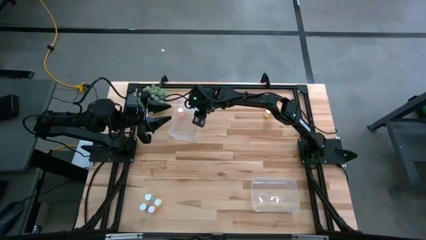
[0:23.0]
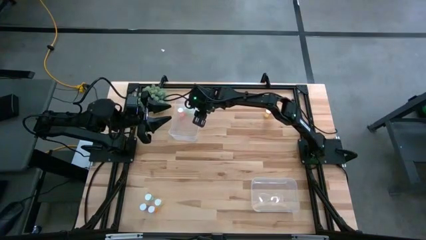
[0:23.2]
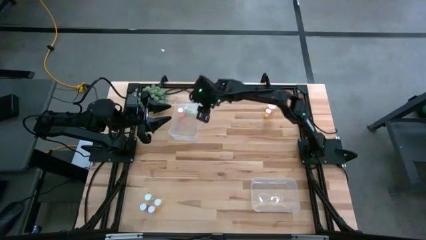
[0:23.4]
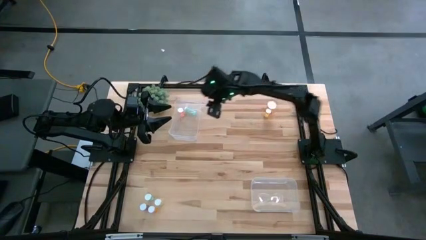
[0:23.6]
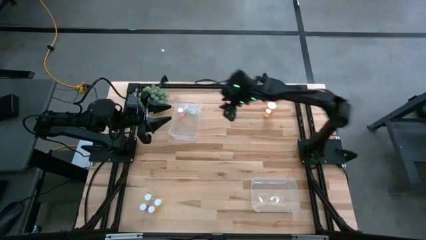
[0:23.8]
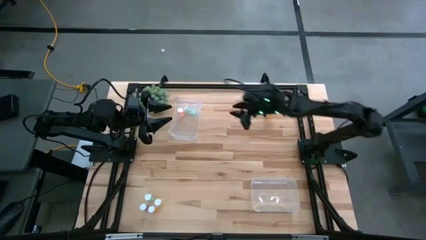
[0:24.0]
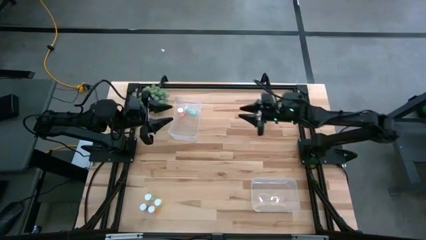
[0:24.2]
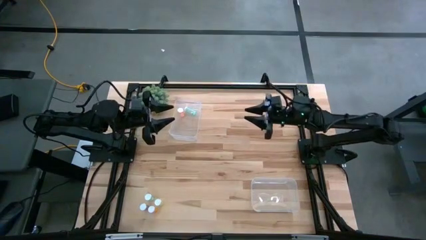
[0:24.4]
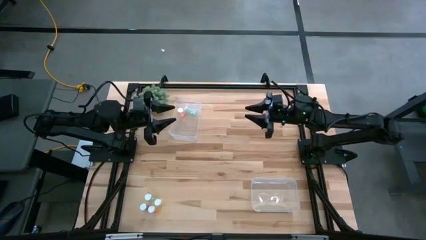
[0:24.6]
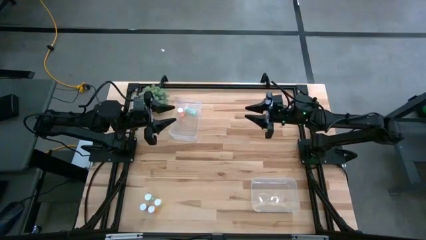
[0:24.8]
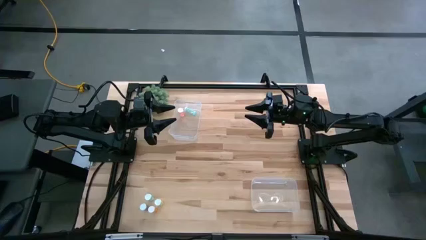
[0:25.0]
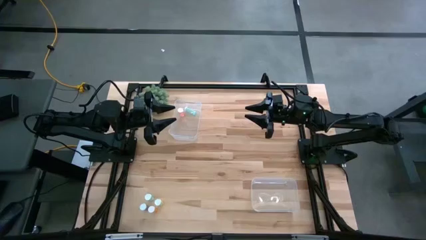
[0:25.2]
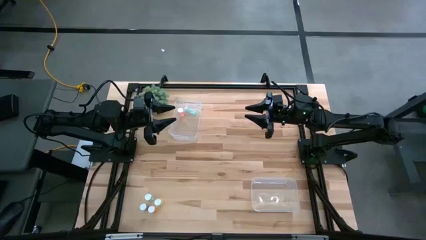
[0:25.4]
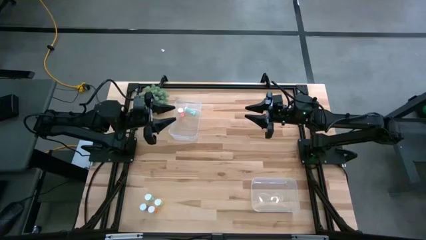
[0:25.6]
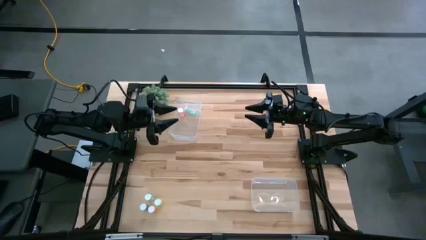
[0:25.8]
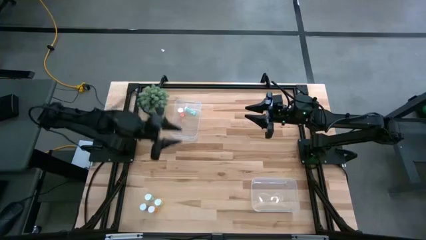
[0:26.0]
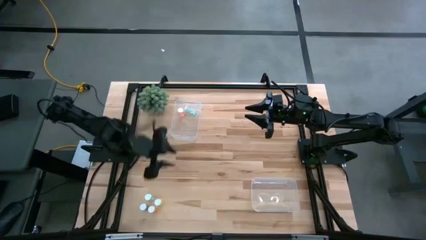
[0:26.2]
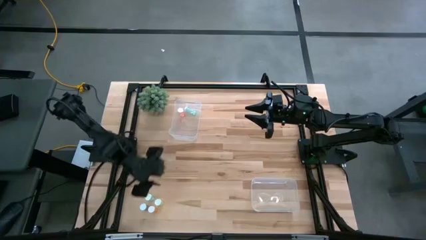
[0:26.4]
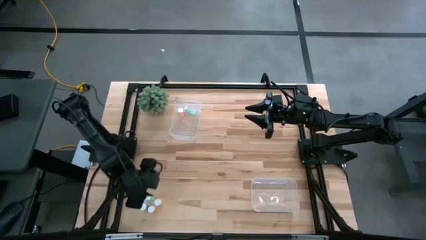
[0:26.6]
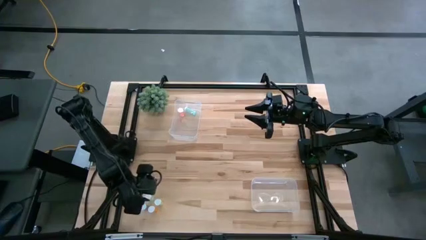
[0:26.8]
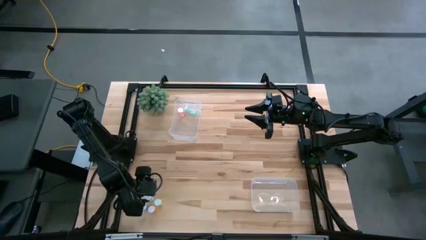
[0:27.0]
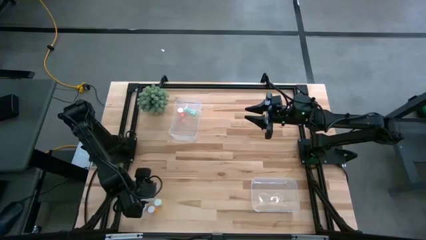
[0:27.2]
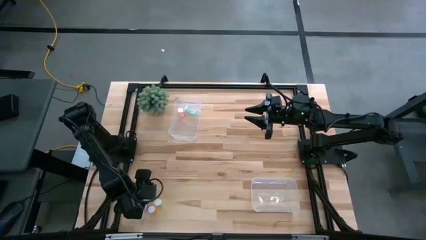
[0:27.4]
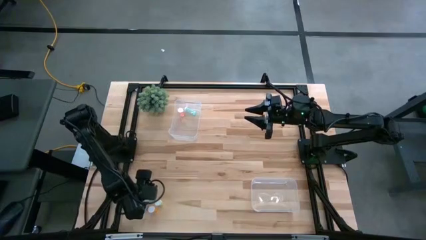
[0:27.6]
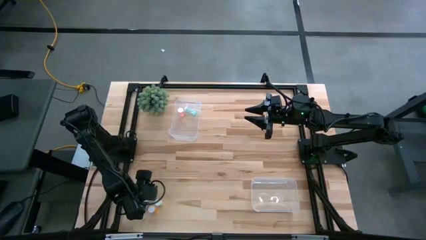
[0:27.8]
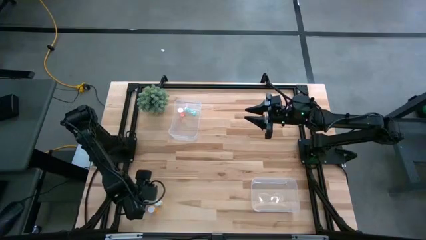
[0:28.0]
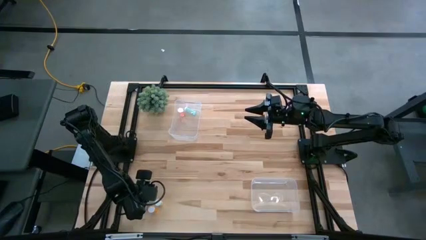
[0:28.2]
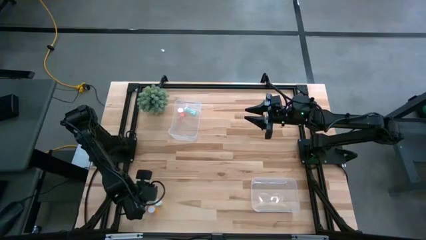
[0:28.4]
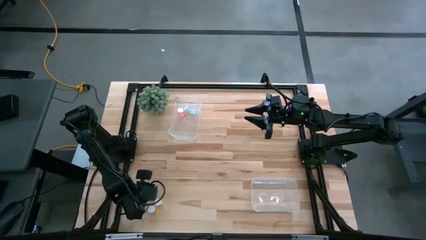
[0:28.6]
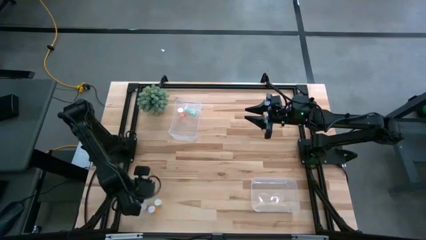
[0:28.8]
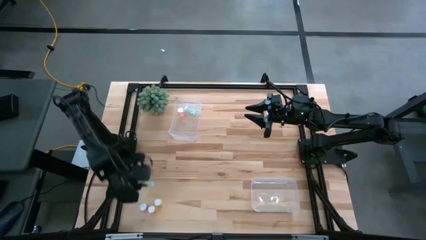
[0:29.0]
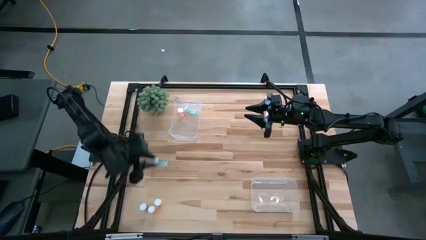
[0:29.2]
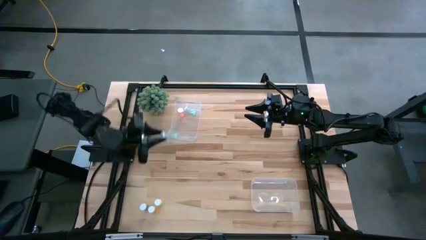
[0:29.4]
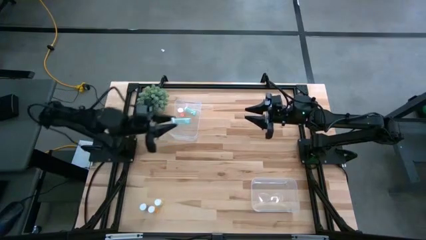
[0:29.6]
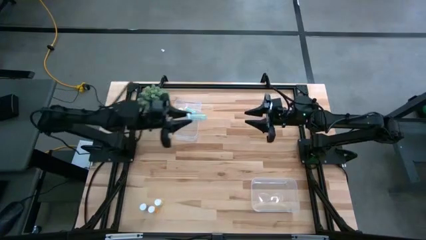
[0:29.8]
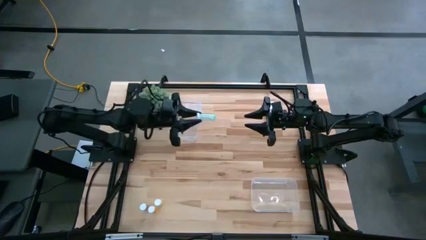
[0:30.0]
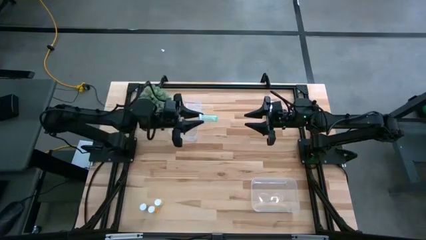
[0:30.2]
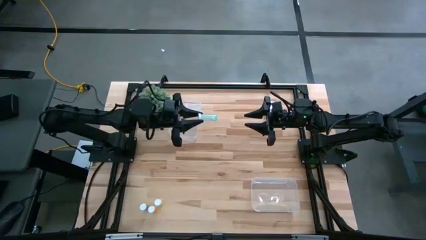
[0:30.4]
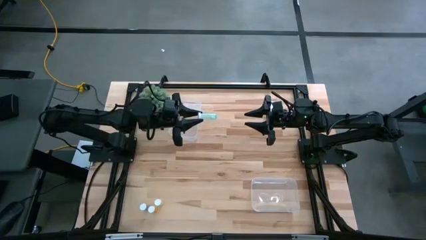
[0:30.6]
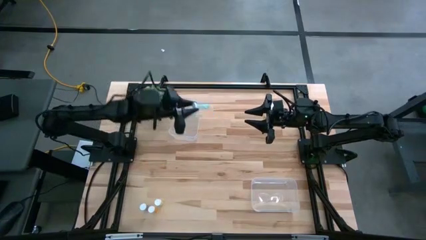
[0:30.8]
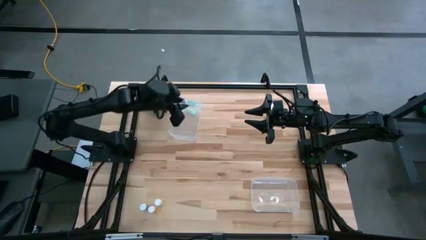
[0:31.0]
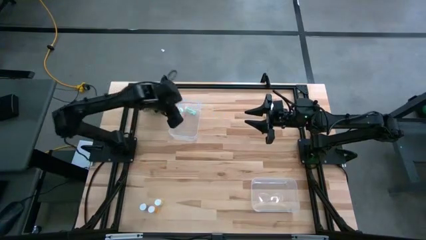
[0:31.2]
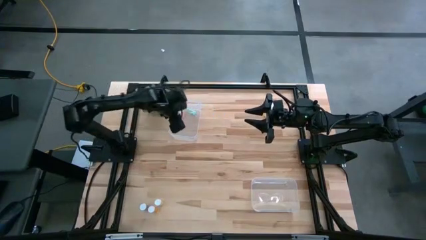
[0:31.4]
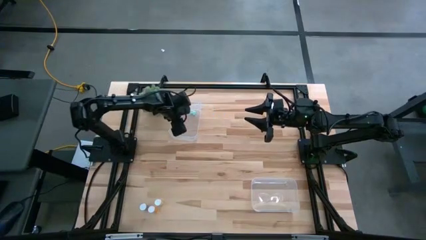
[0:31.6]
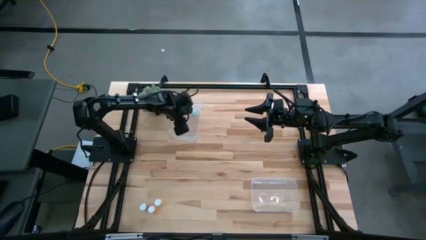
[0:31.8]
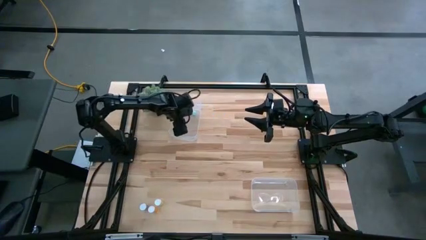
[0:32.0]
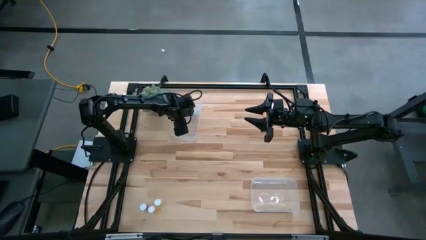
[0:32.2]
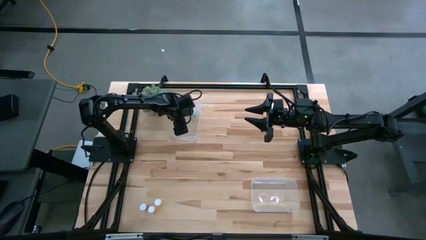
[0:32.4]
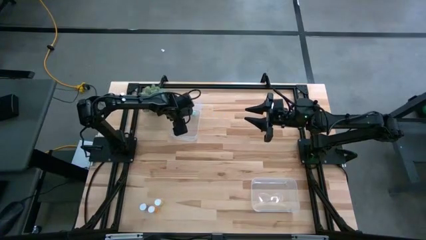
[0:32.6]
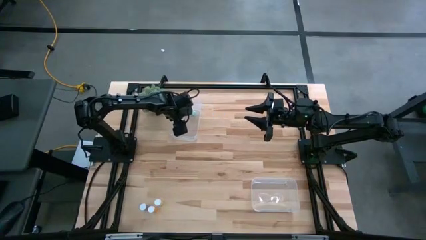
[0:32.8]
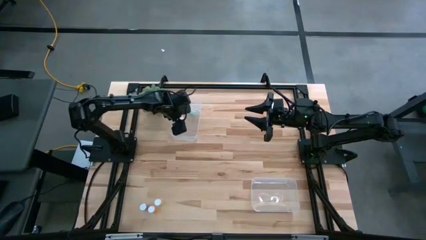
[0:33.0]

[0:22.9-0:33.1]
Task: Pick and place medicine bottles into bin by pill shape (circle, oval)
Put the blue tablet bottle into the top transparent bin

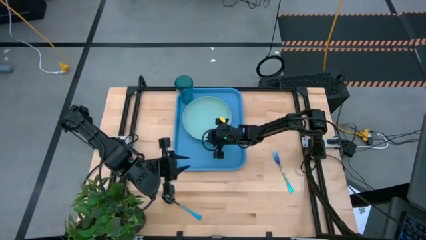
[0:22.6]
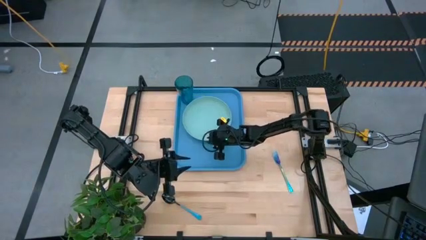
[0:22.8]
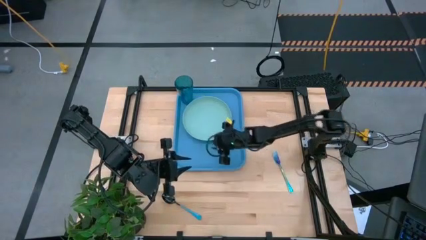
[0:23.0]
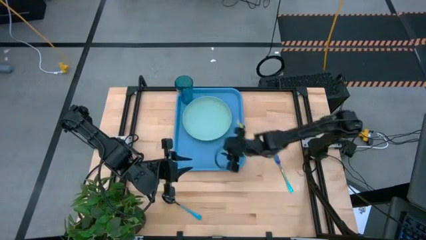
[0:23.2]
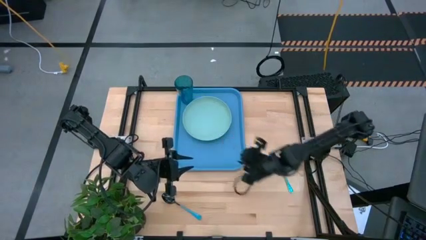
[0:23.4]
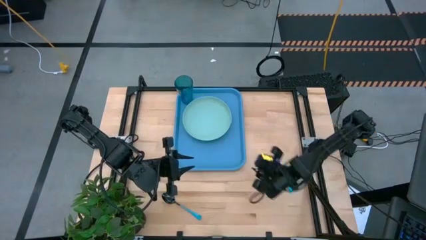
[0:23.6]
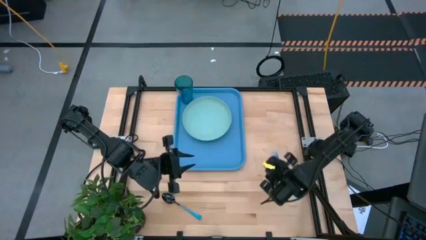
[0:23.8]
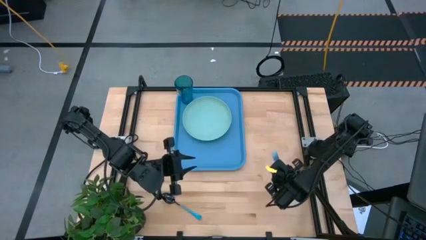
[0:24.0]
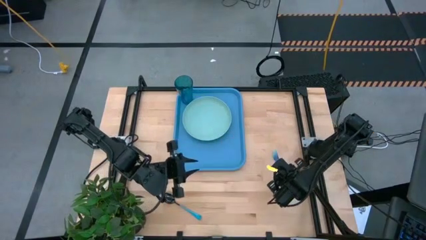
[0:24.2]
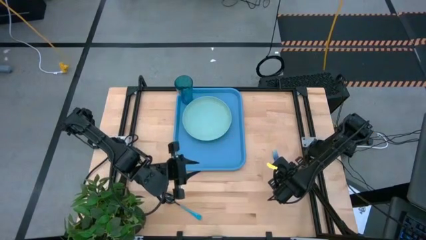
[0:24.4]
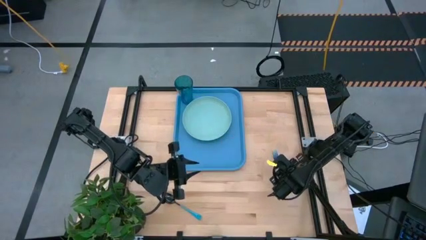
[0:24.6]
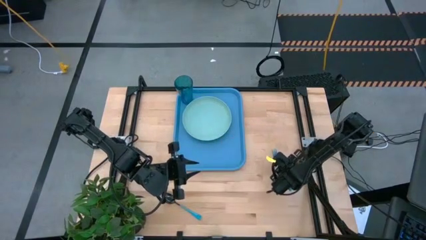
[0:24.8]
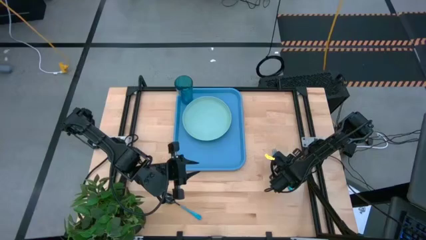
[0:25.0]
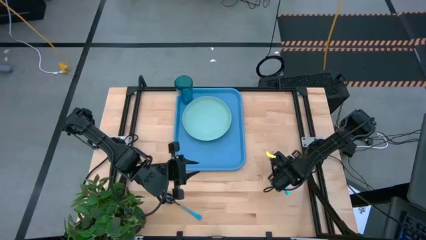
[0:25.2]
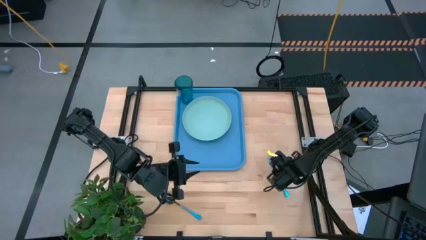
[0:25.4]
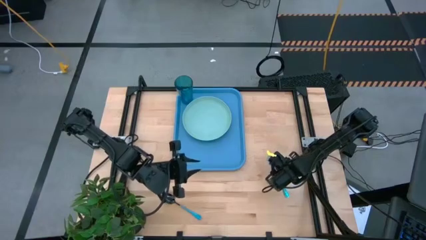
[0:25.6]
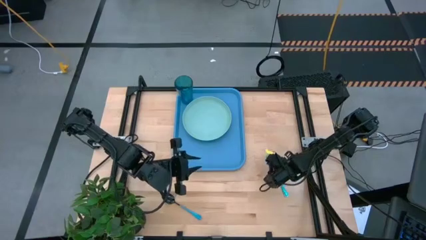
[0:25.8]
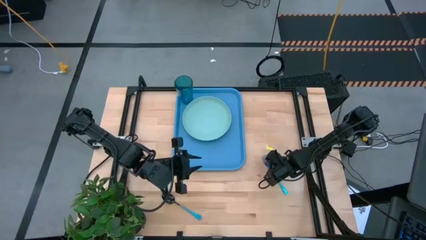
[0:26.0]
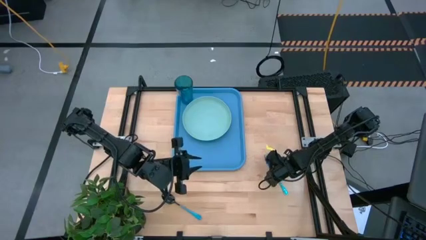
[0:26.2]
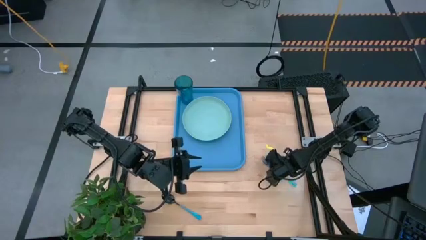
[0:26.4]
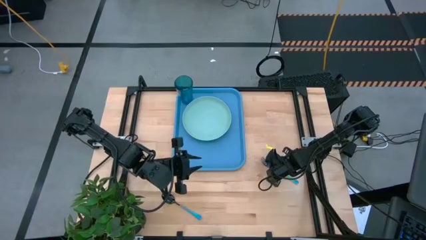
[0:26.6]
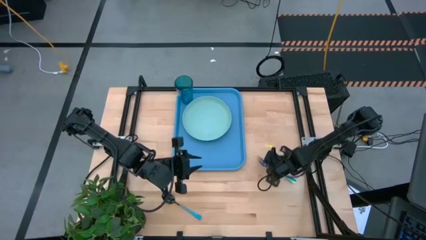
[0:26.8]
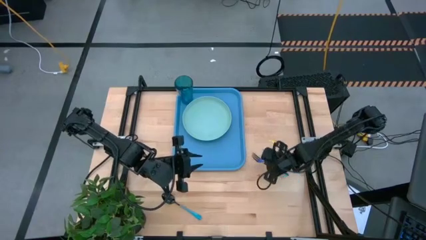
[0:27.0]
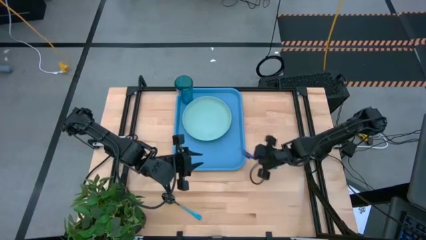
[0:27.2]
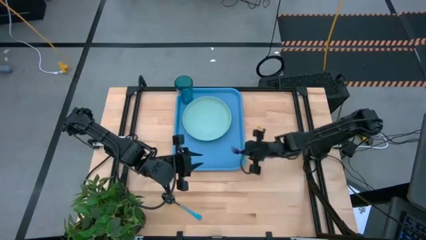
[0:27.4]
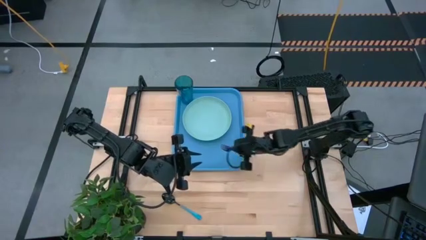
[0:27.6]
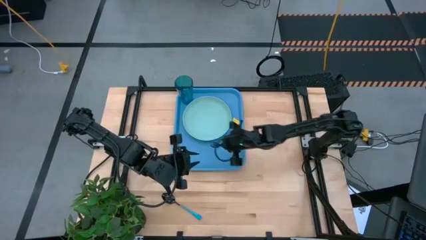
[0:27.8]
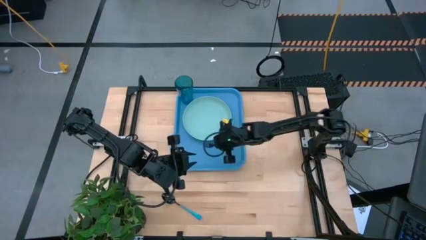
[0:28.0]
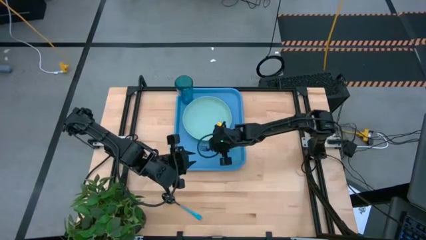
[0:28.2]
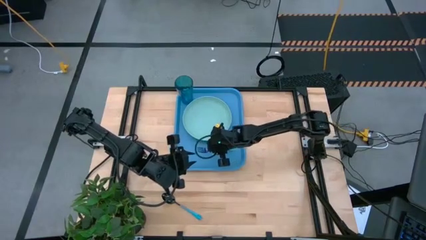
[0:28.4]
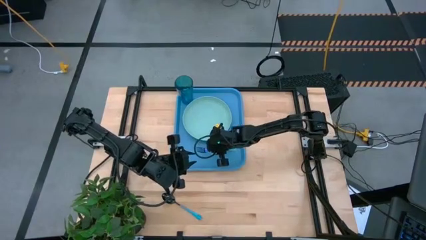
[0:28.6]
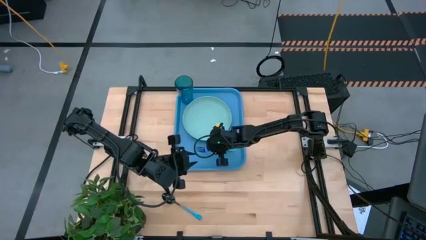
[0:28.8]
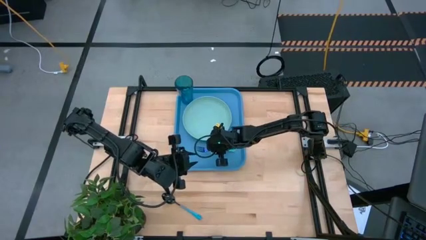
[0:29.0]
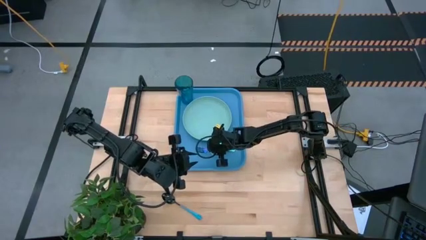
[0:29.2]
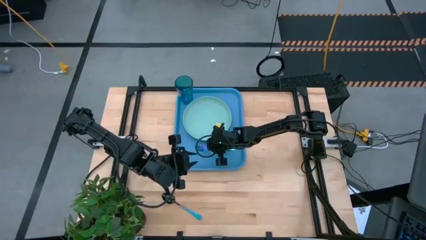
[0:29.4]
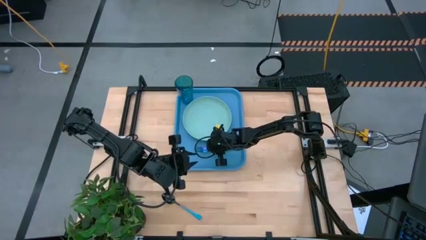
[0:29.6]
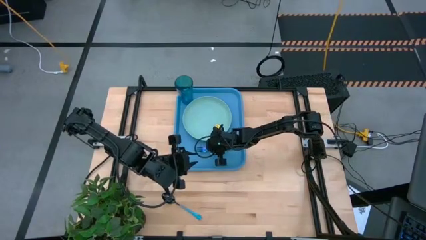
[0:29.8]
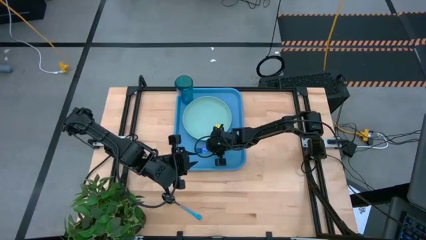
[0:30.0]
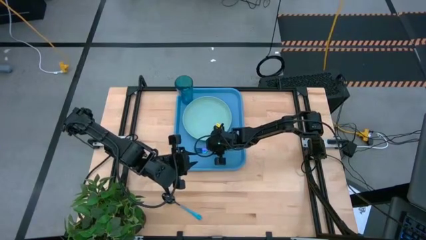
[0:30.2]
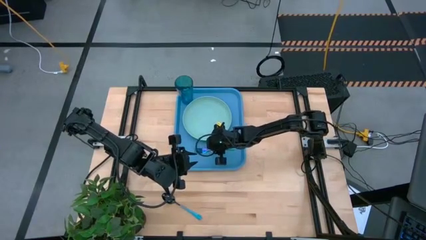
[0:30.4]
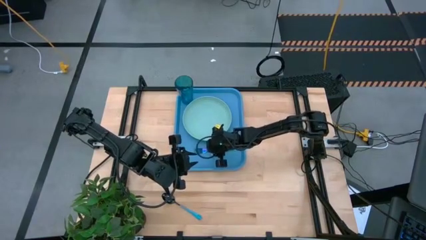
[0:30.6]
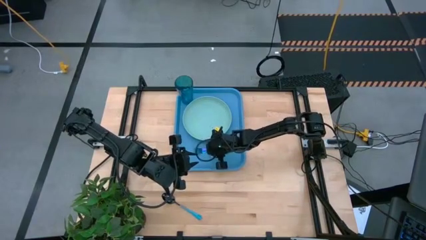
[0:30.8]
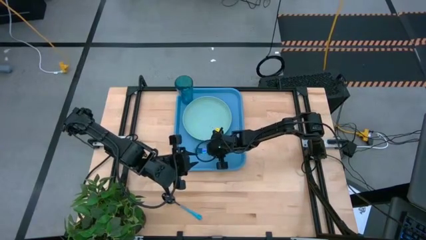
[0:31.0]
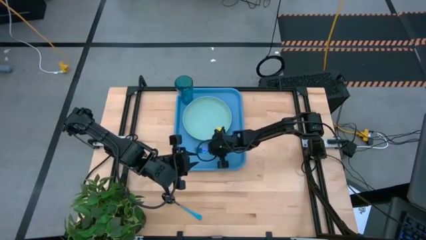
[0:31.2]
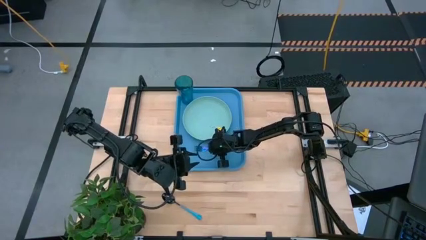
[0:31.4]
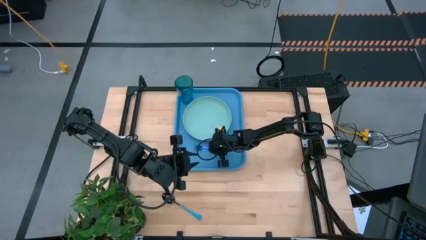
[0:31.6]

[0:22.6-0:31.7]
Task: Pick and place plate/cup/fork/spoon on tray
Put the violet fork on the blue serving tray to the left of the light green plate
